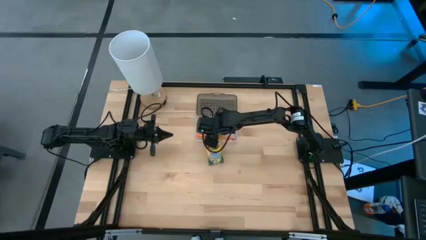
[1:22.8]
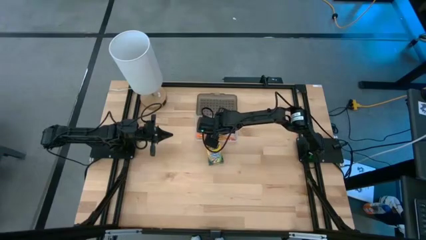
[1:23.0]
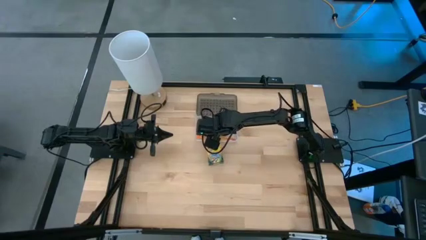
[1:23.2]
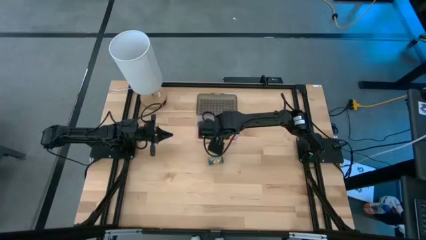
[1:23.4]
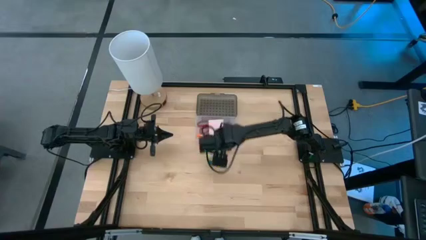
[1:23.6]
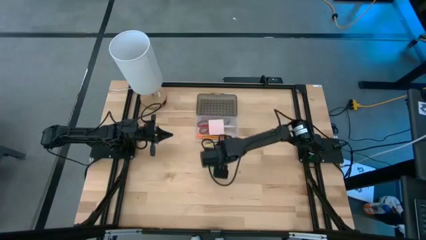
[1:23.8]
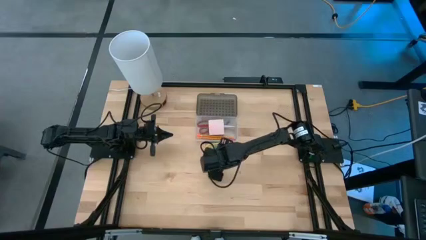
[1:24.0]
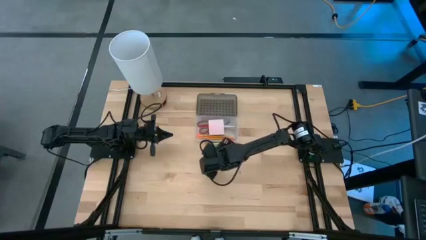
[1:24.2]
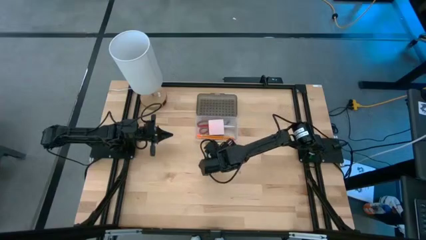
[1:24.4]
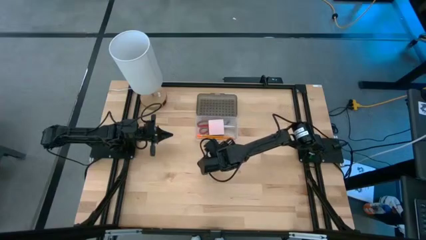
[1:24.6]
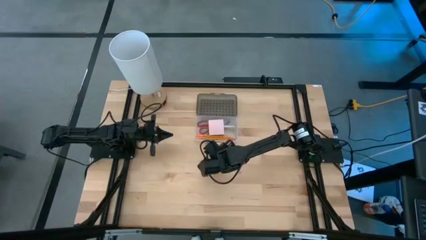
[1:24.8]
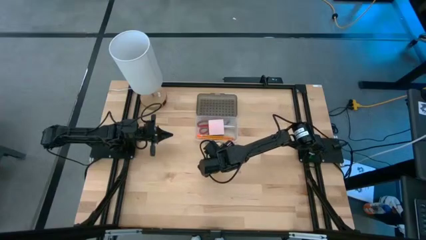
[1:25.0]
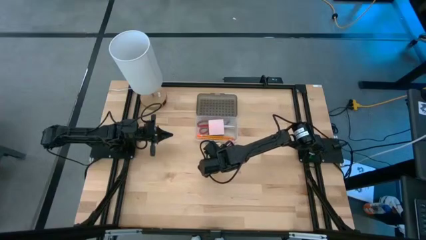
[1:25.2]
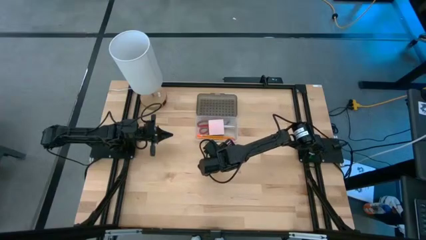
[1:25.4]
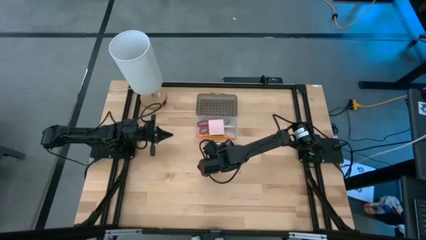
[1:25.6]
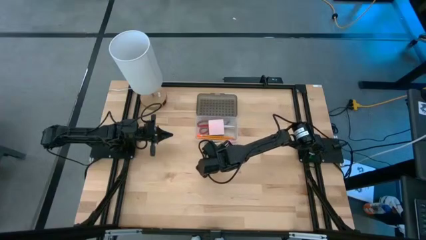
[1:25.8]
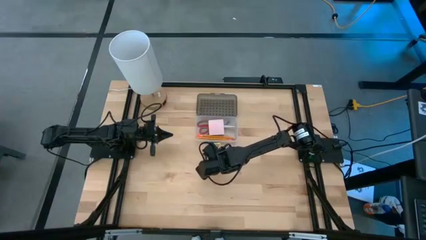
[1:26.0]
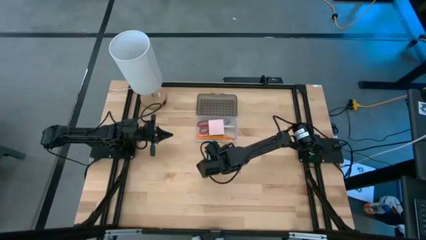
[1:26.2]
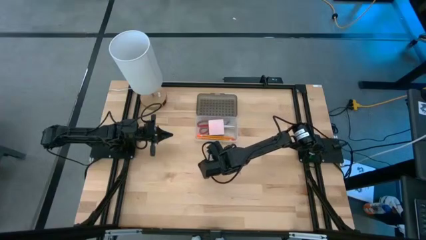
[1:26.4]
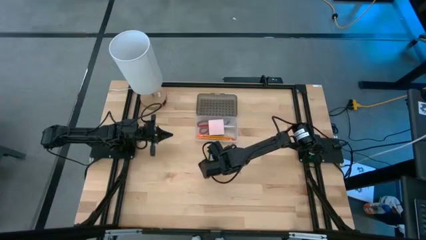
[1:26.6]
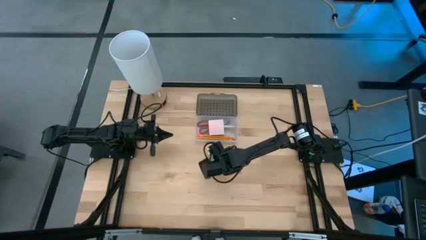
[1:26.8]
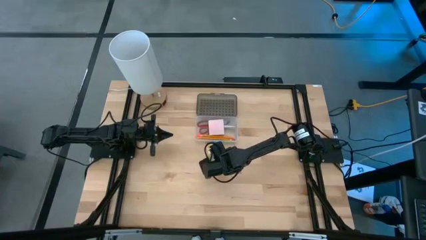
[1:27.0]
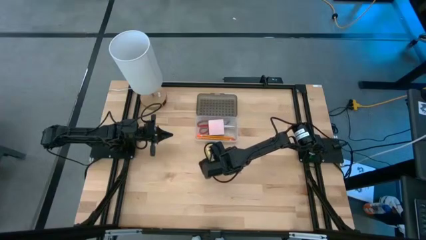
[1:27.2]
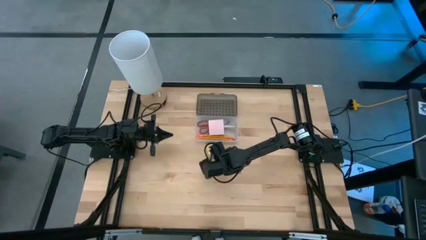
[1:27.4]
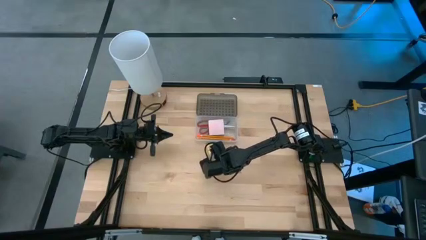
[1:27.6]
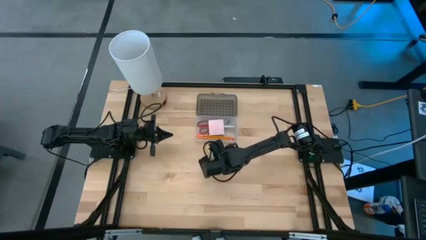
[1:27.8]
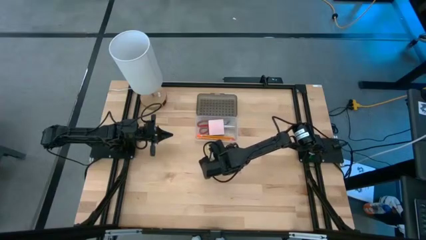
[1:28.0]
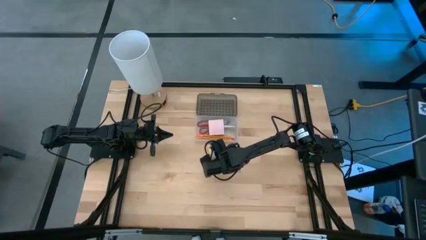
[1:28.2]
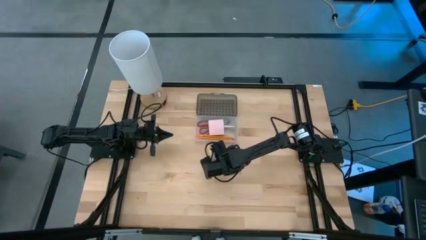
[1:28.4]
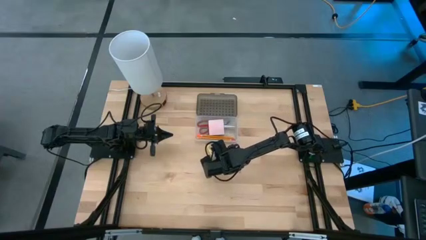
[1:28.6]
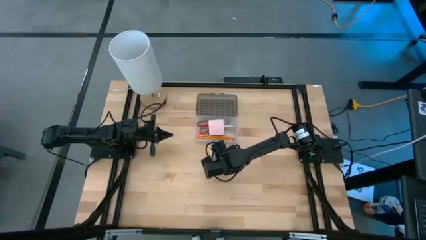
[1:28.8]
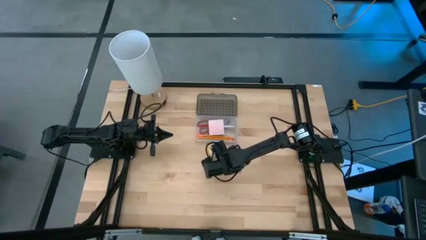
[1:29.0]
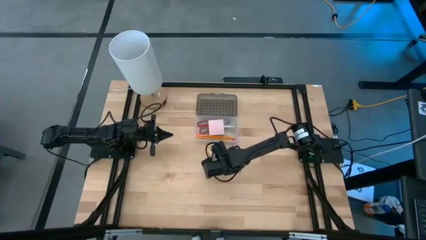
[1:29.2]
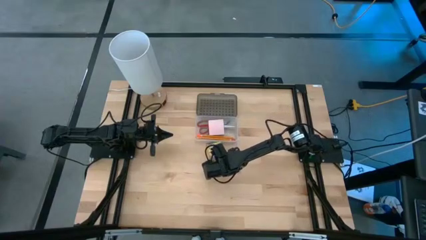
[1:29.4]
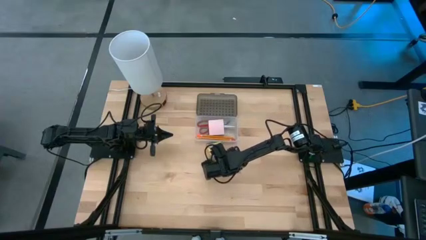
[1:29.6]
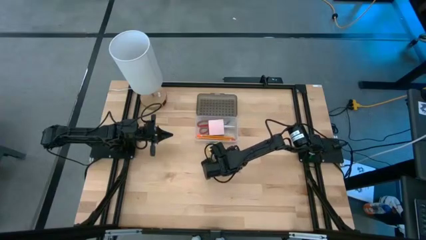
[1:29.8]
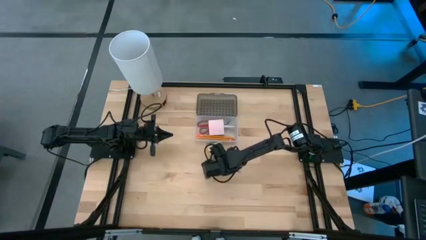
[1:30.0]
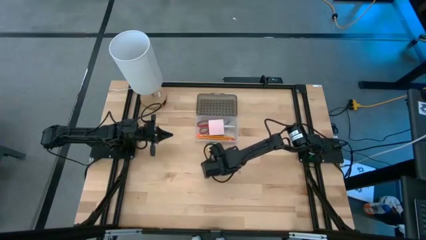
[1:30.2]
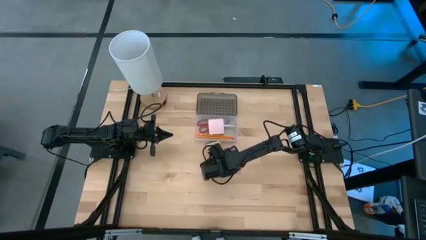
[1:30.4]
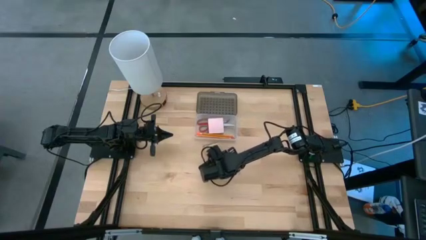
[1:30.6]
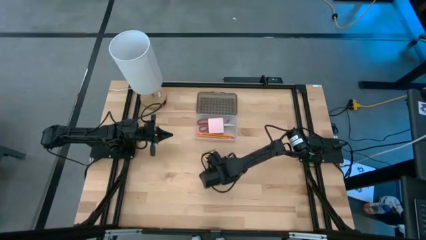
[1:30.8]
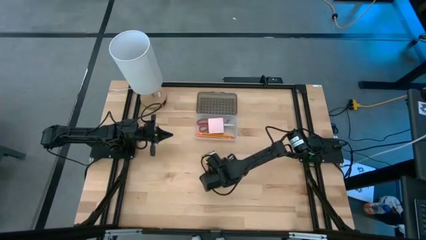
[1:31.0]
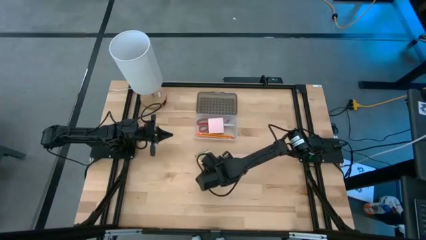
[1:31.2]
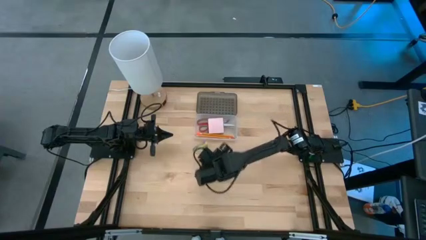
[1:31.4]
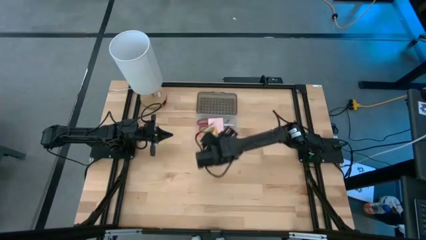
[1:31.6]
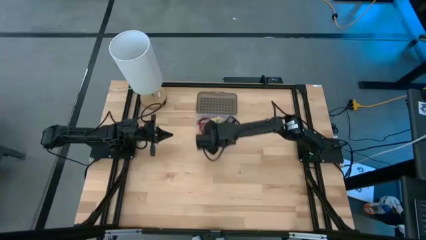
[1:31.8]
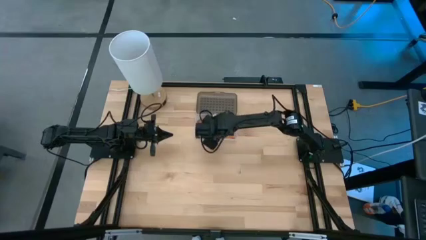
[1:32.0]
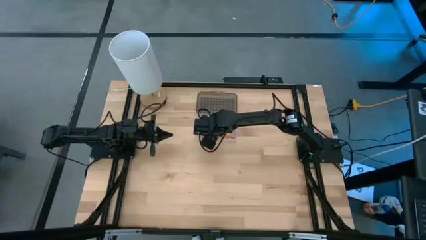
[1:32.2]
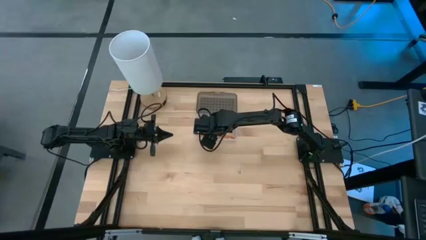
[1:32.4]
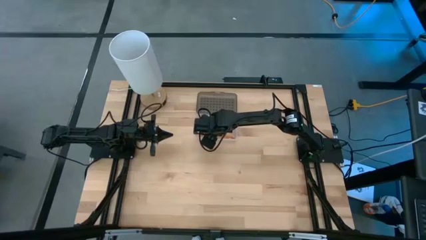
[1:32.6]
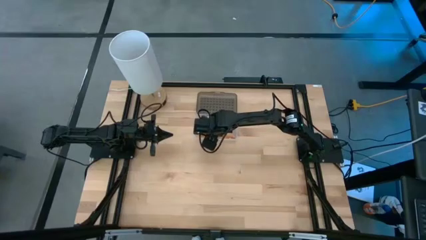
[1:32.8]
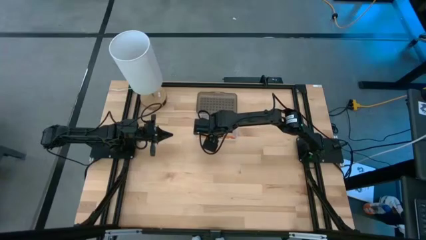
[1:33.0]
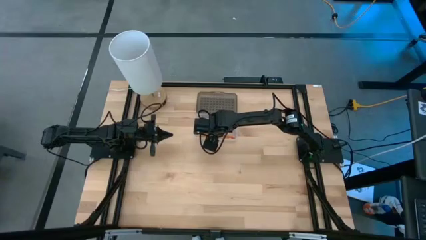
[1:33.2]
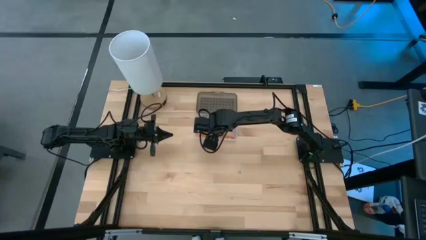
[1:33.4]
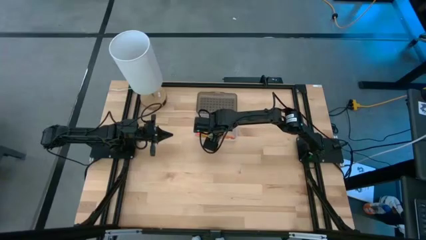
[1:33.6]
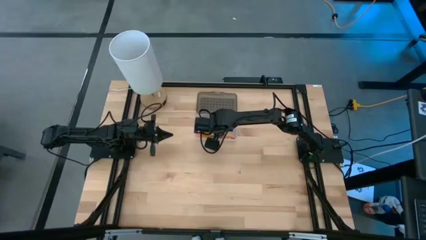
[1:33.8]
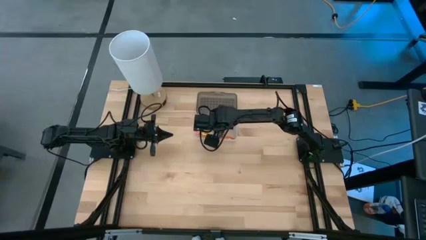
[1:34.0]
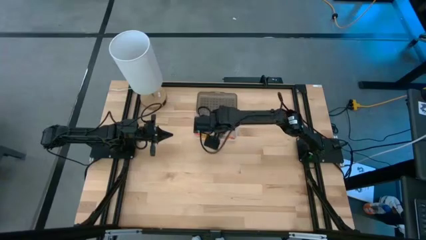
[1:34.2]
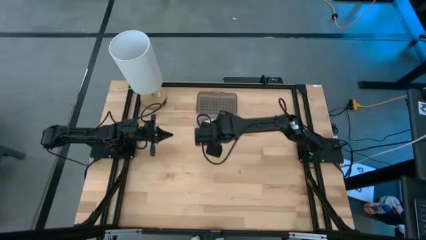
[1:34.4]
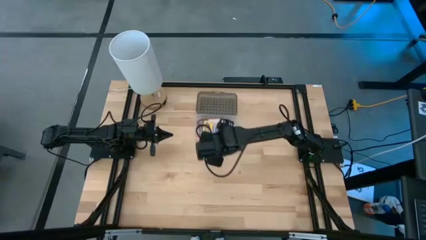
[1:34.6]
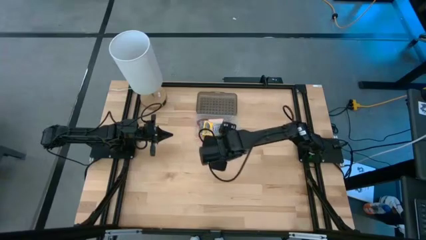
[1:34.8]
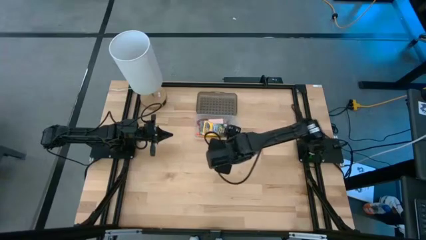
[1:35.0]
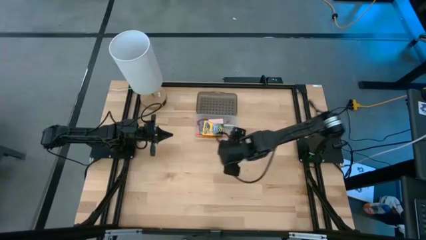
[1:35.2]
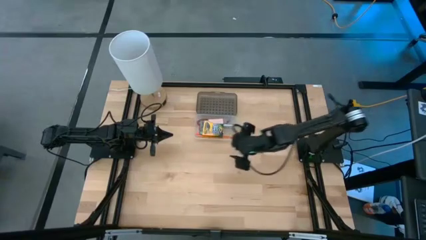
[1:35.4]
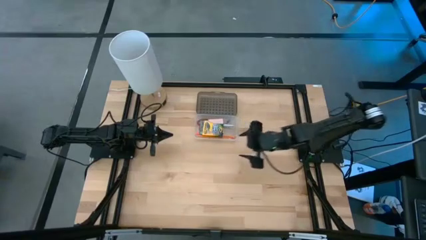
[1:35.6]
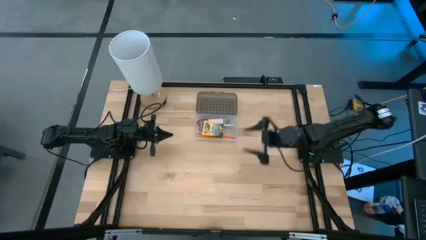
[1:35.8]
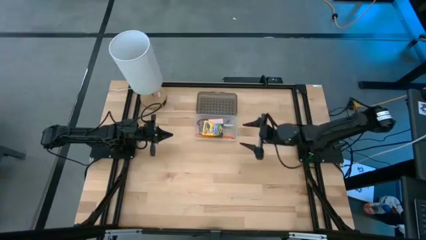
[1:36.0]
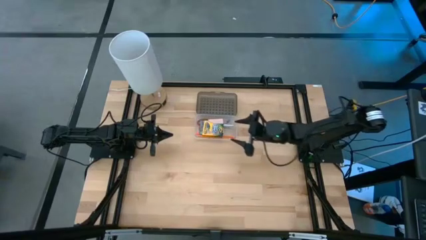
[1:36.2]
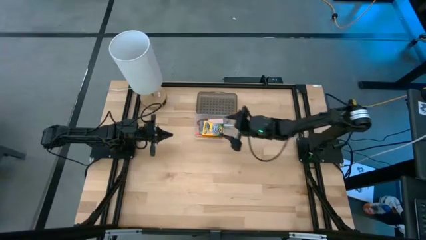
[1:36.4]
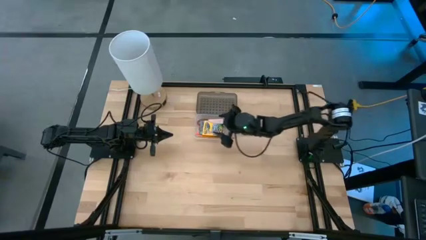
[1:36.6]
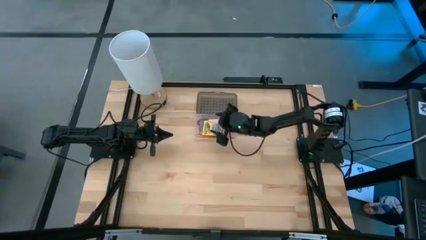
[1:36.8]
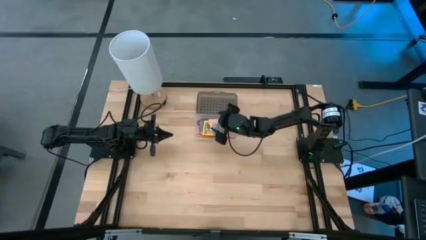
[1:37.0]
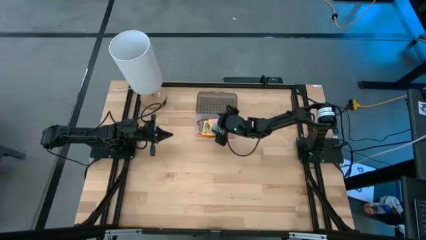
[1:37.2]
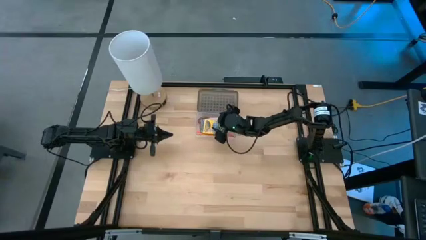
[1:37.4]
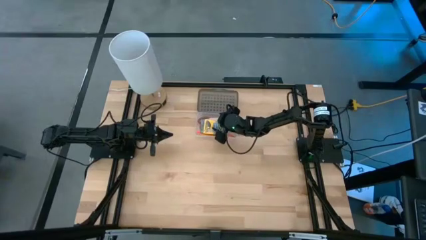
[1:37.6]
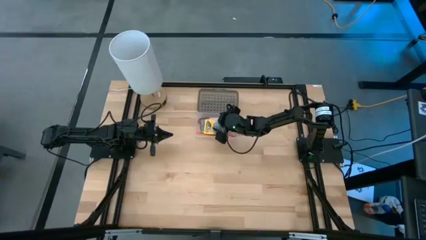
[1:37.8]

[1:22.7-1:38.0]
Task: Pack school essentials
Put the yellow crayon box into the gray supply box
